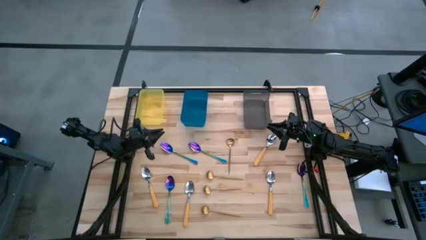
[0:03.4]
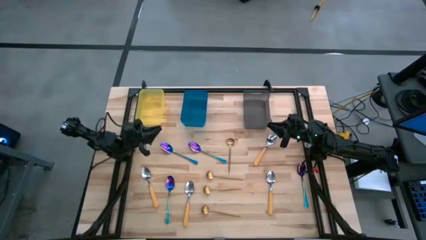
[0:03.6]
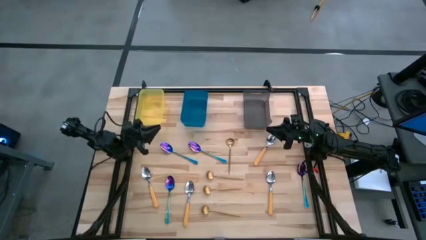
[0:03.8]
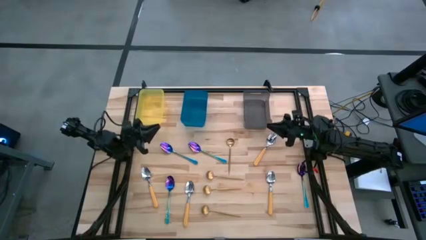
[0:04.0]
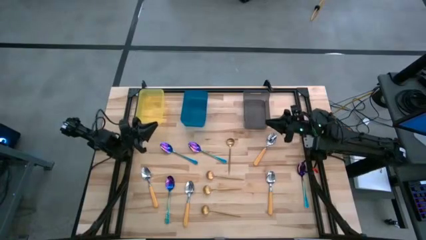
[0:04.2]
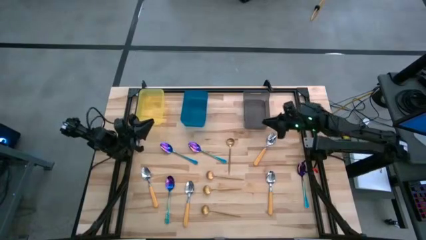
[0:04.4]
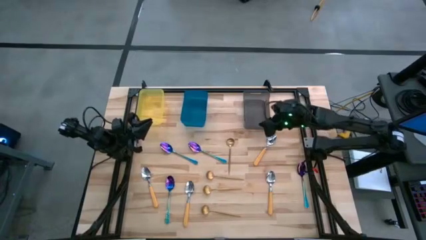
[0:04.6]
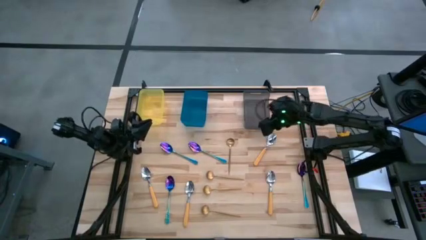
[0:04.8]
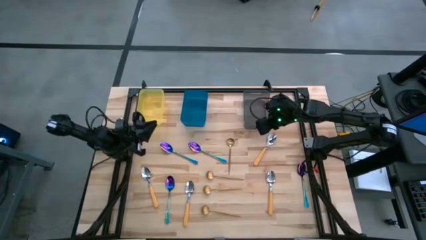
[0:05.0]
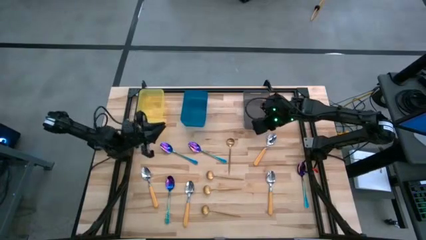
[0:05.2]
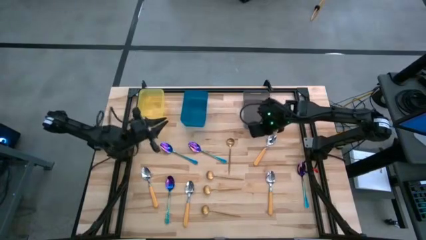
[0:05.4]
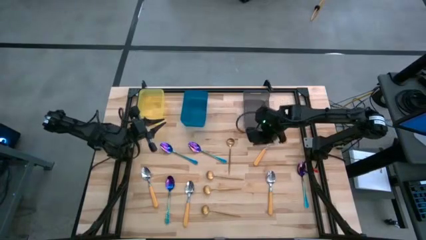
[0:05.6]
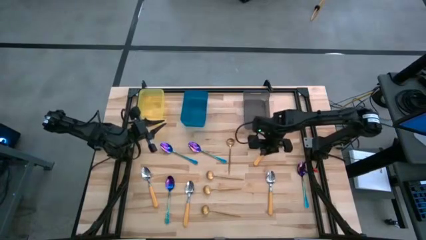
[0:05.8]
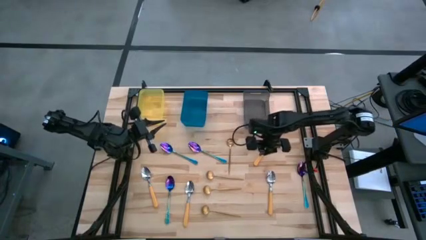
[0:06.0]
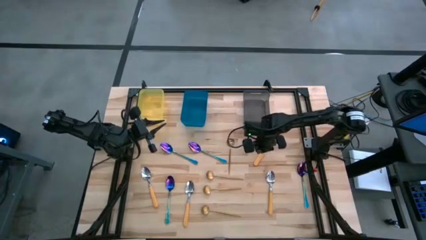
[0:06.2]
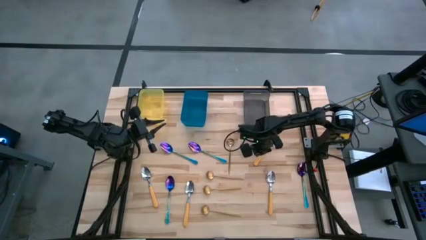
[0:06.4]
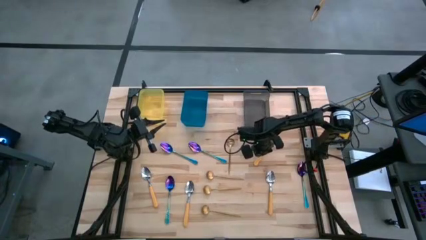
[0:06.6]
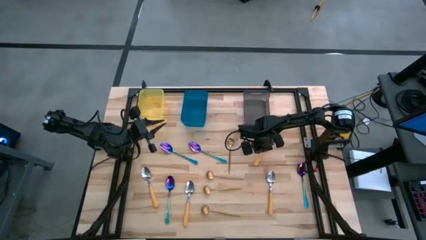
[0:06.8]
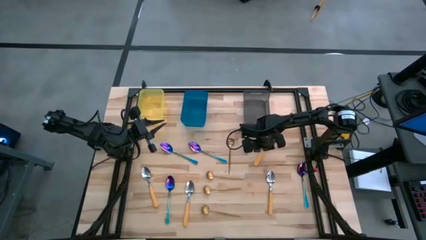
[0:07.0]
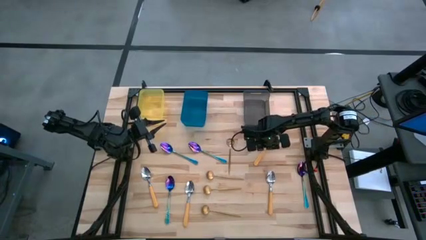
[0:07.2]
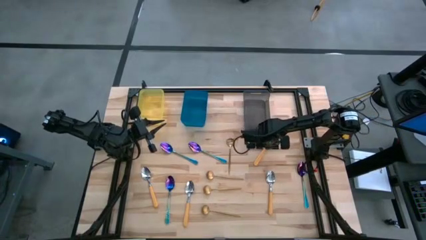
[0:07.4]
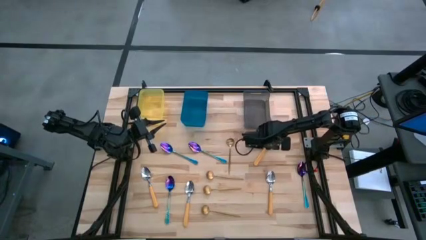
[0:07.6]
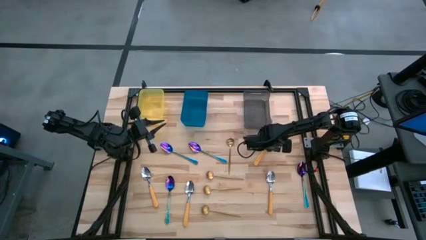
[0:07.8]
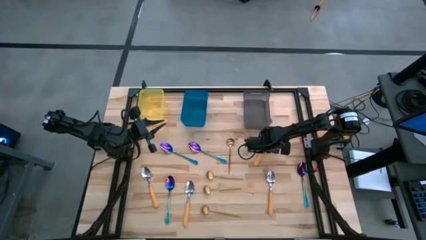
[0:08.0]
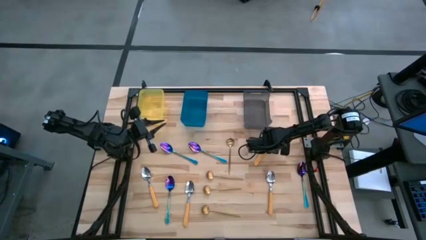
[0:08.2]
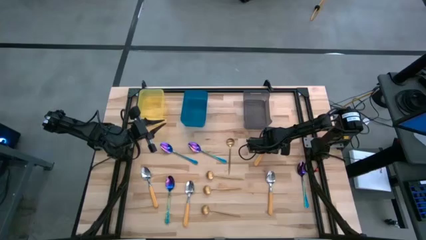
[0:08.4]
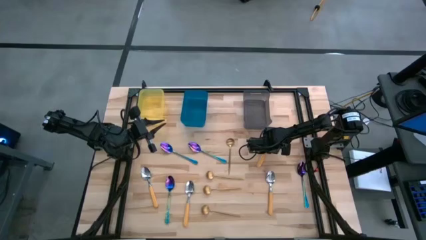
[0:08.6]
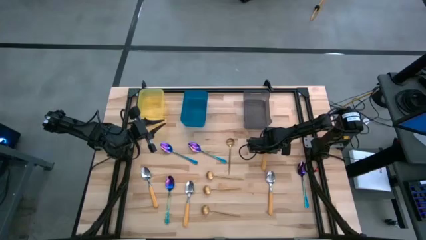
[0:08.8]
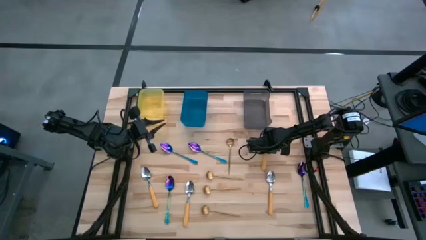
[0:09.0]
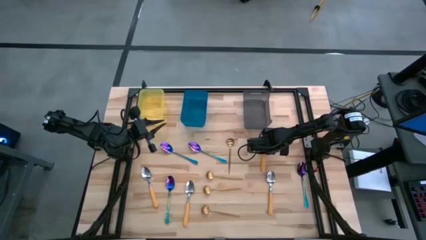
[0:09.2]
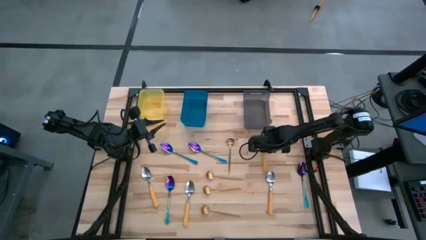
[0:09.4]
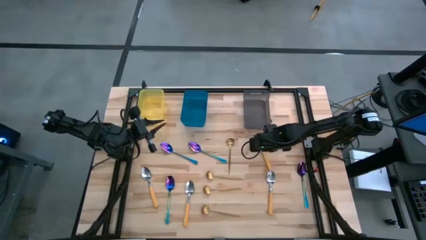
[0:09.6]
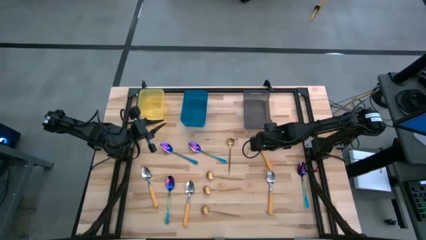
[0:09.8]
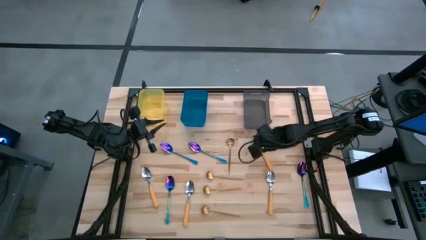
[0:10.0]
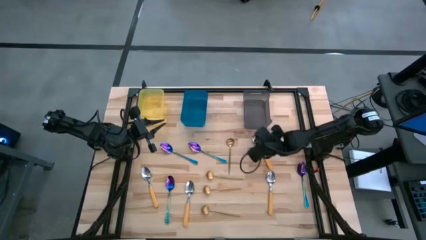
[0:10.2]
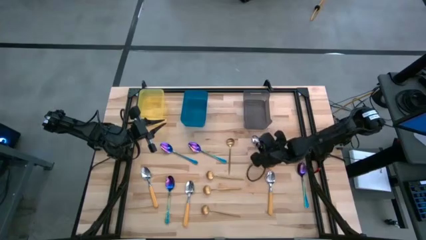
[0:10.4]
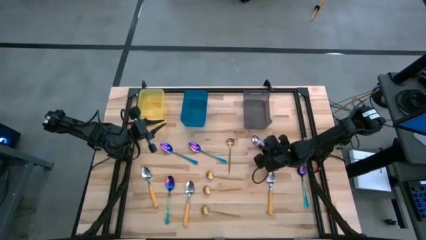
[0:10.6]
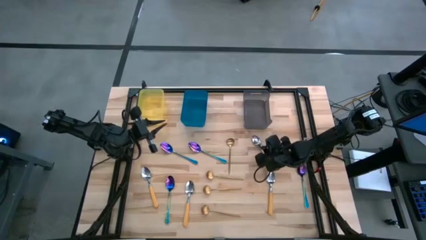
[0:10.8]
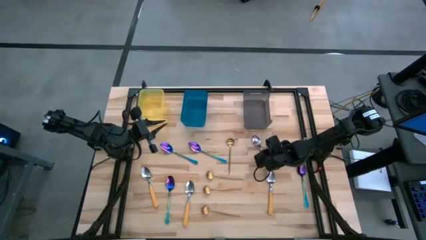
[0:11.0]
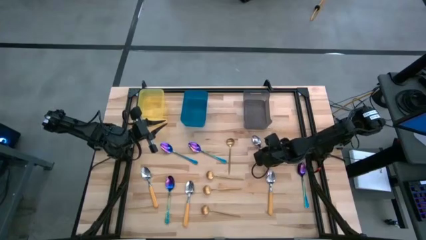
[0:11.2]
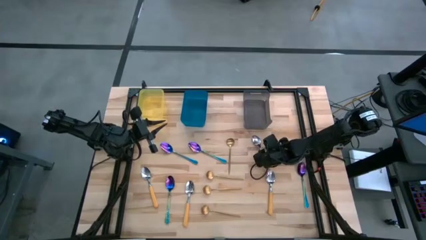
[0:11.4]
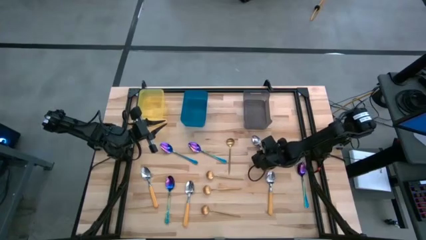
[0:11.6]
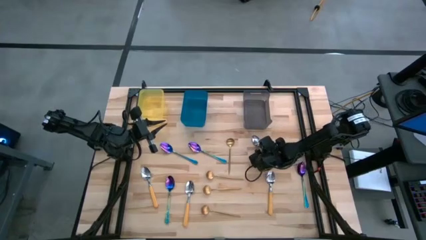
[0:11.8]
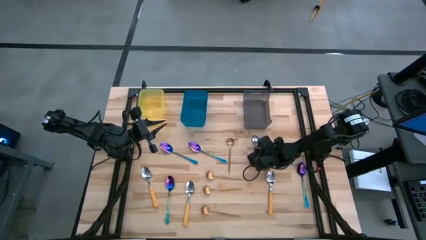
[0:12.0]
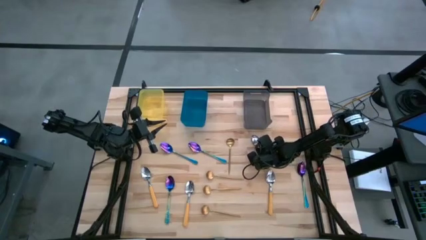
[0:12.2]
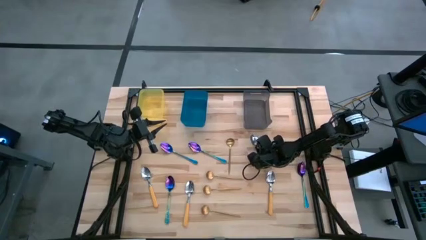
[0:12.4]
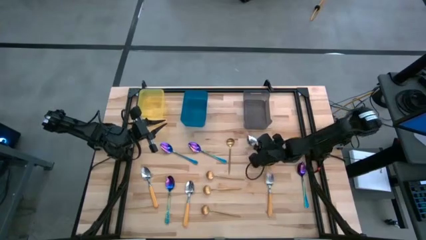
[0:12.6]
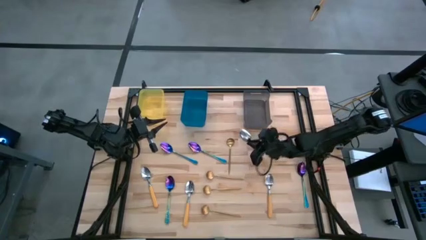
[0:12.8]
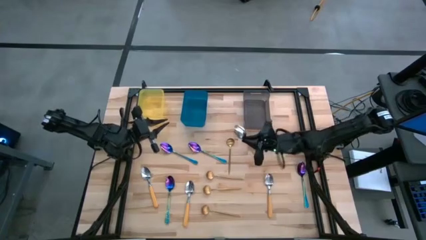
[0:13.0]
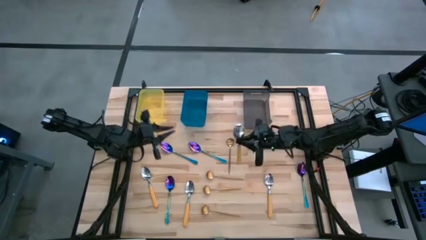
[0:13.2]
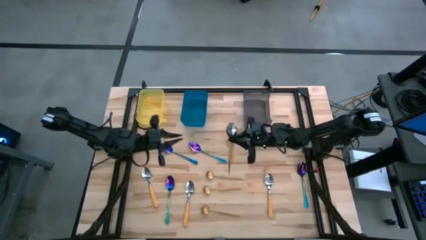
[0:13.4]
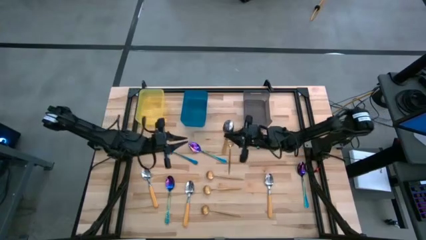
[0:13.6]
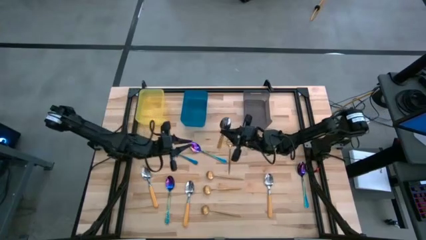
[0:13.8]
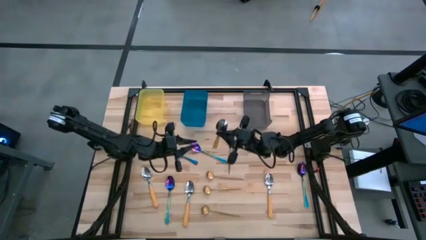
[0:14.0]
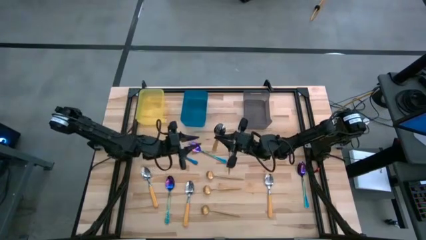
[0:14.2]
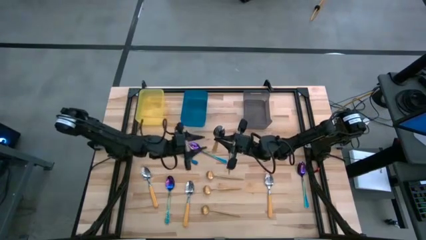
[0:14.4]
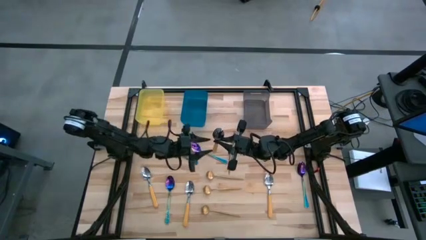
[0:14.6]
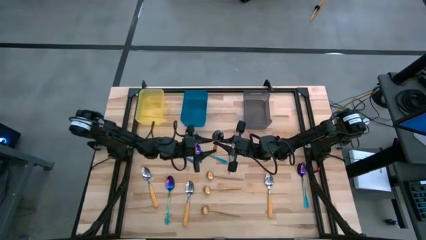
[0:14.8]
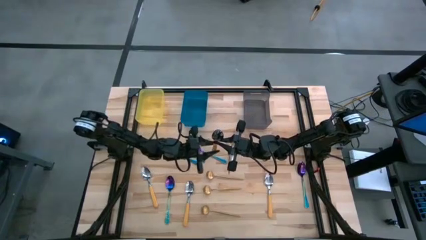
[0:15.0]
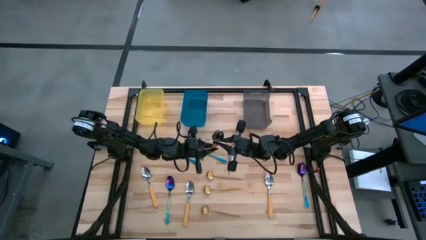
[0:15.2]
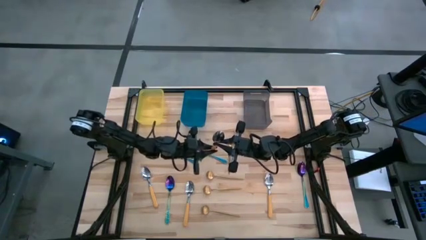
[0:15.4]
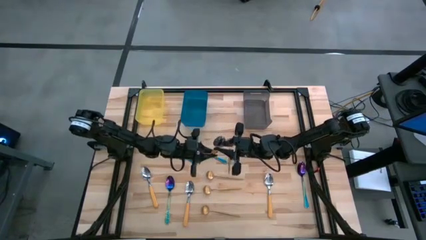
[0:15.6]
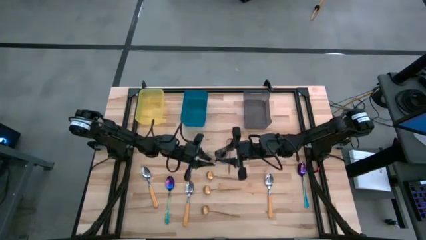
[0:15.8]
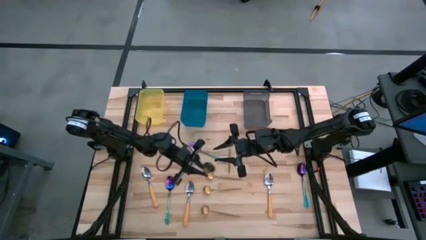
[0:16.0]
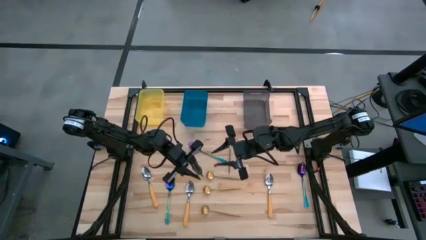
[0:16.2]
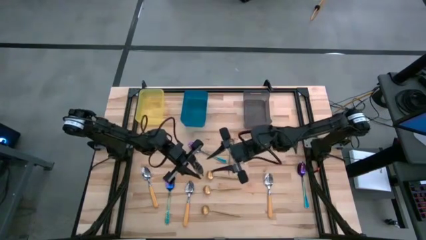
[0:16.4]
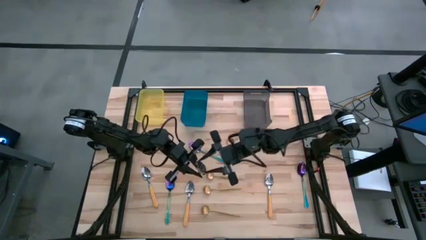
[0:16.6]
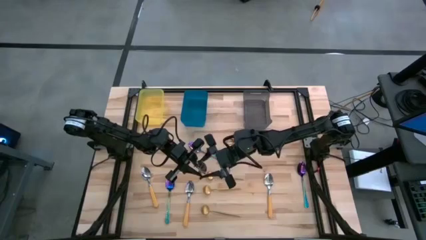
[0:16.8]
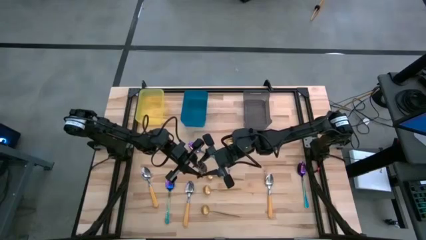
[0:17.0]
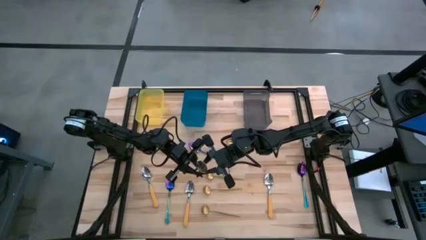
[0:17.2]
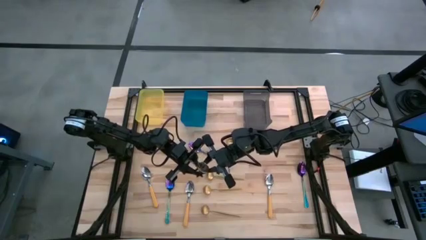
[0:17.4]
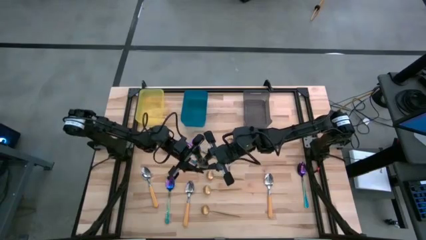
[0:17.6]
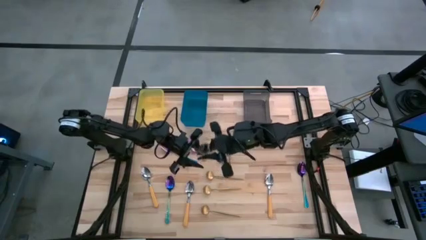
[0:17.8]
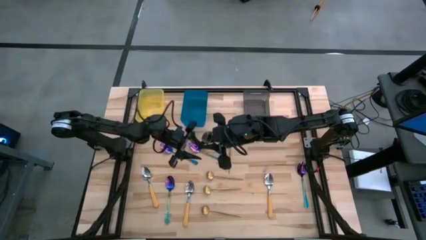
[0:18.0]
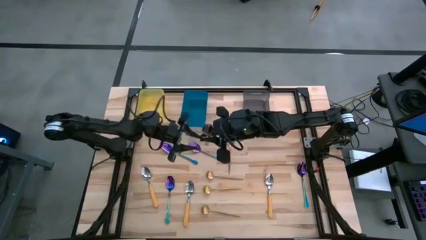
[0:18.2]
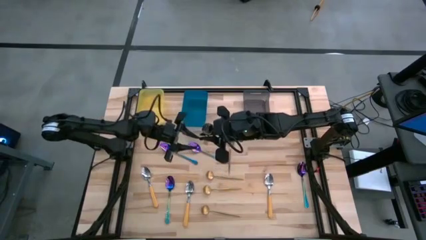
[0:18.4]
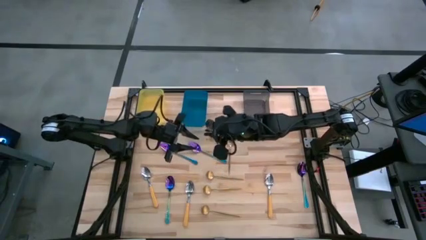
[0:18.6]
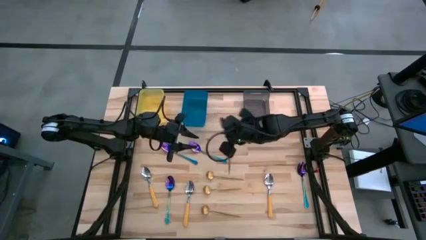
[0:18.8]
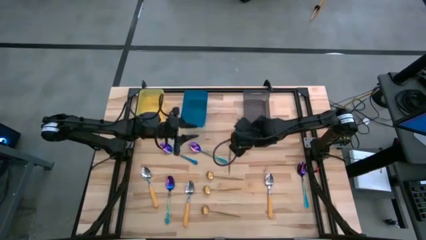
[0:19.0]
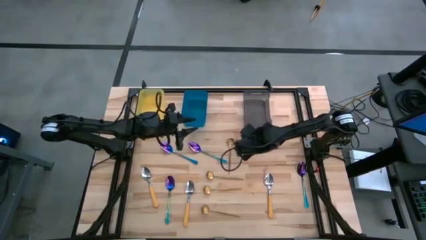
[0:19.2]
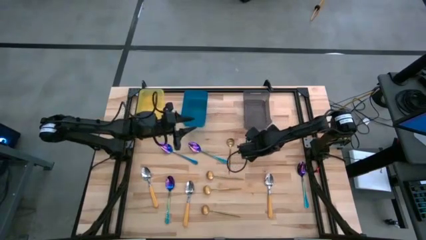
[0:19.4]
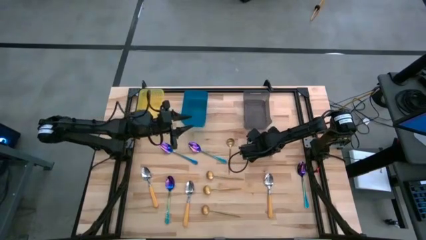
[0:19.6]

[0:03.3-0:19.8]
Task: Sort silverware by color (type)
Put the yellow spoon into the black bin
